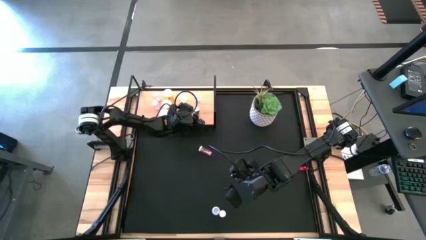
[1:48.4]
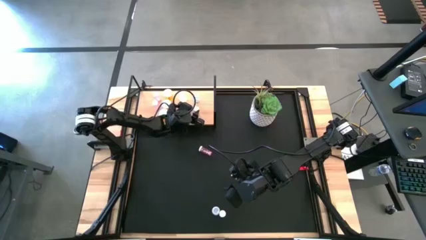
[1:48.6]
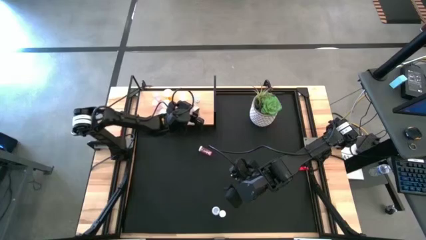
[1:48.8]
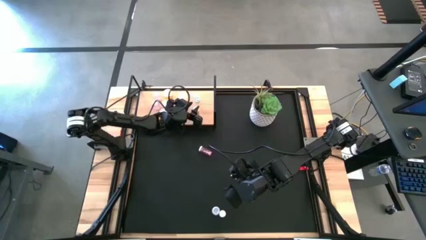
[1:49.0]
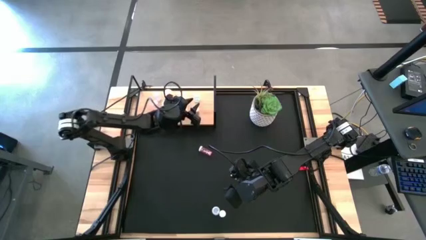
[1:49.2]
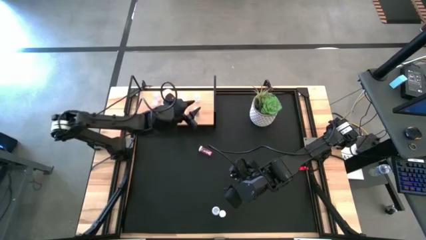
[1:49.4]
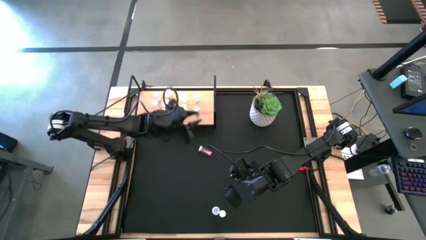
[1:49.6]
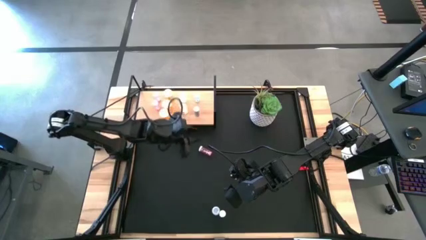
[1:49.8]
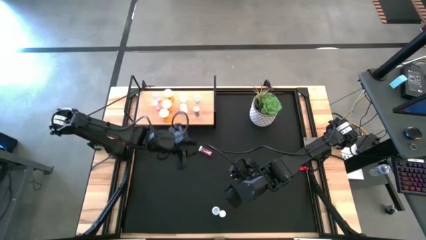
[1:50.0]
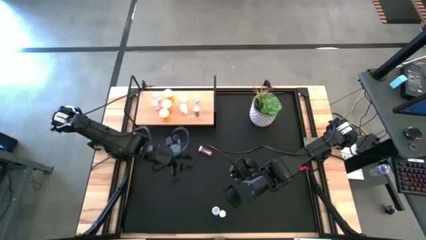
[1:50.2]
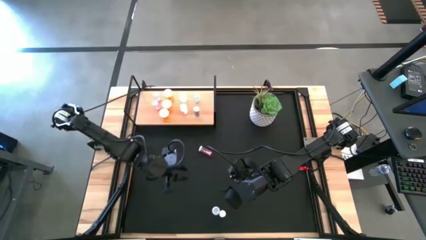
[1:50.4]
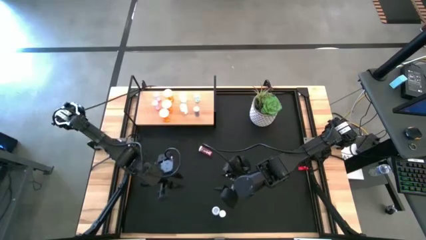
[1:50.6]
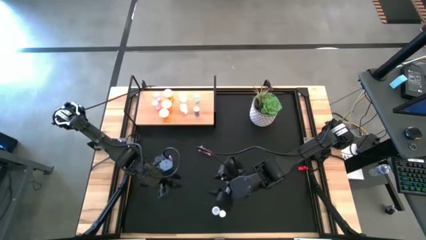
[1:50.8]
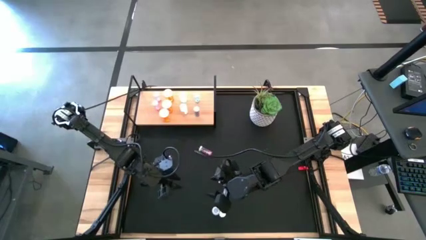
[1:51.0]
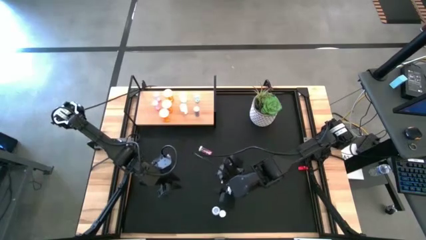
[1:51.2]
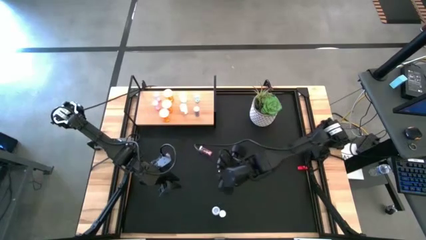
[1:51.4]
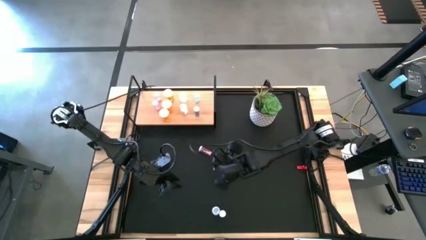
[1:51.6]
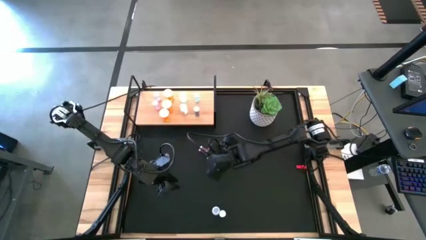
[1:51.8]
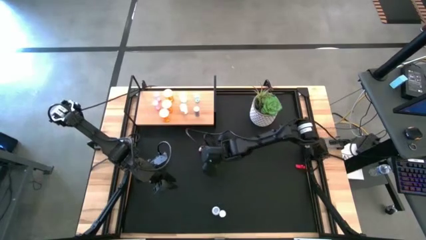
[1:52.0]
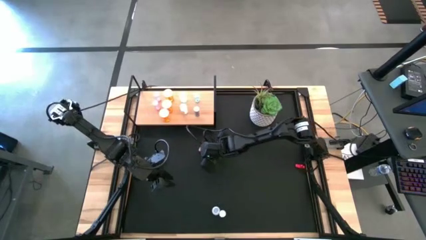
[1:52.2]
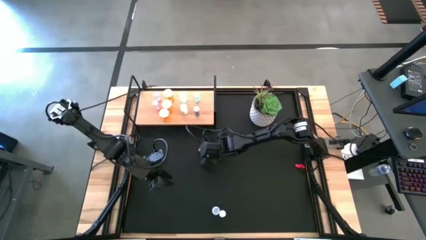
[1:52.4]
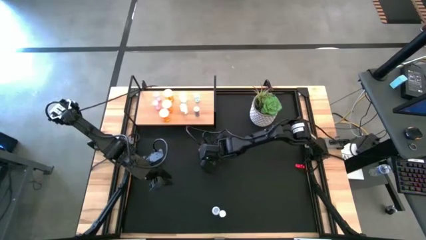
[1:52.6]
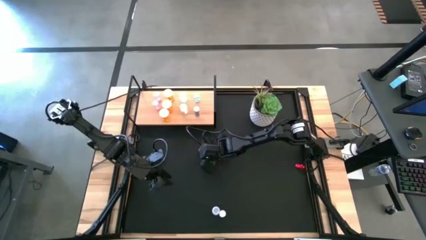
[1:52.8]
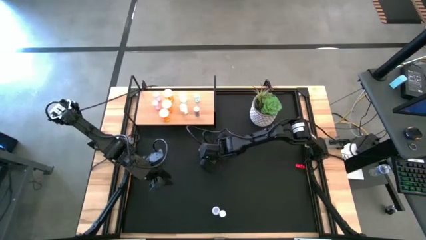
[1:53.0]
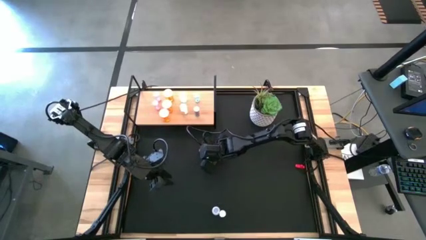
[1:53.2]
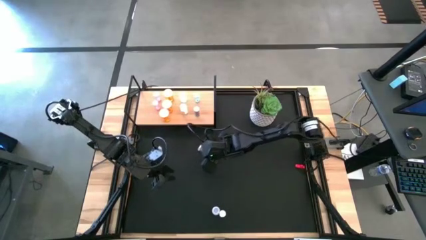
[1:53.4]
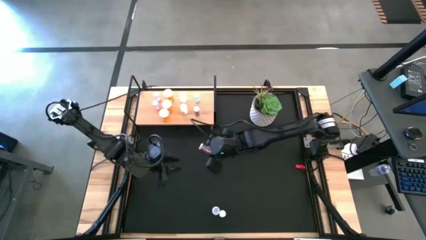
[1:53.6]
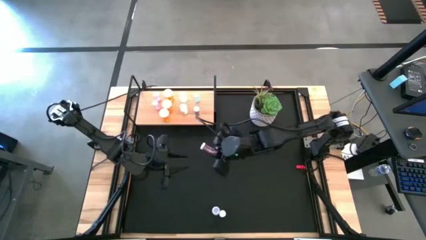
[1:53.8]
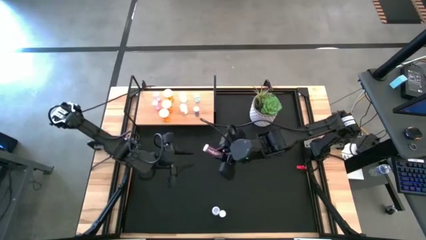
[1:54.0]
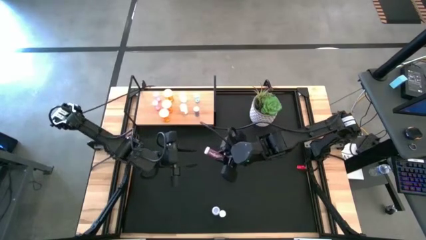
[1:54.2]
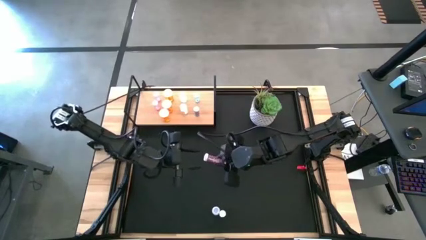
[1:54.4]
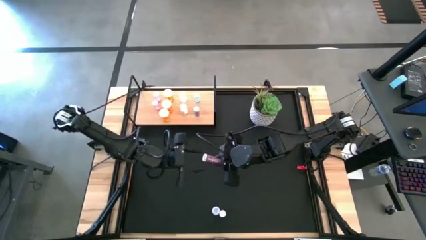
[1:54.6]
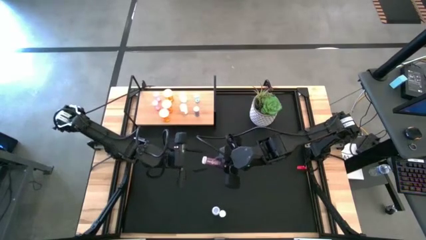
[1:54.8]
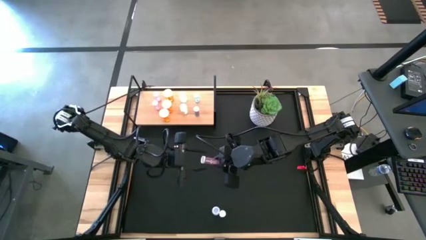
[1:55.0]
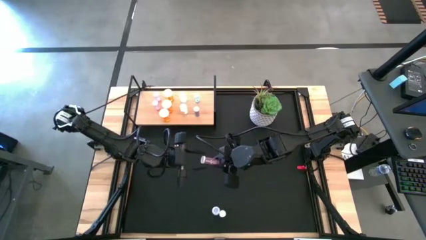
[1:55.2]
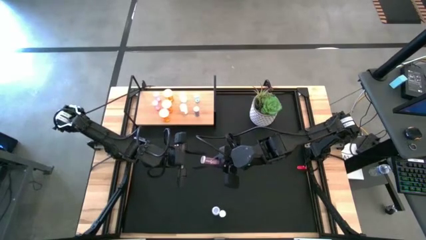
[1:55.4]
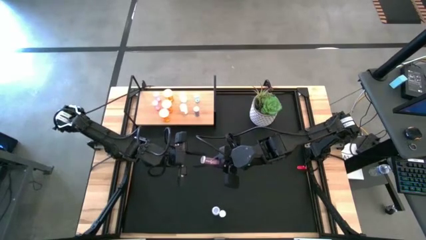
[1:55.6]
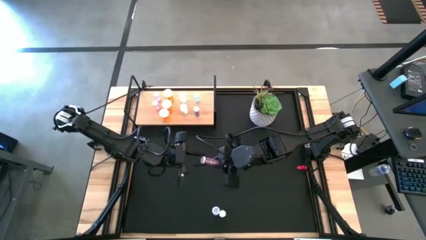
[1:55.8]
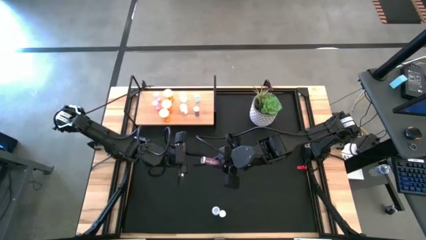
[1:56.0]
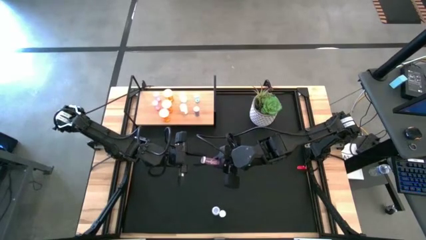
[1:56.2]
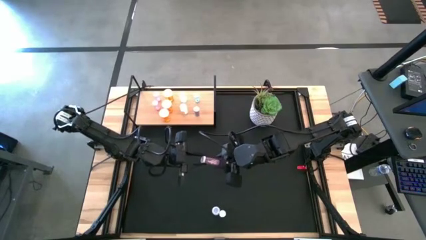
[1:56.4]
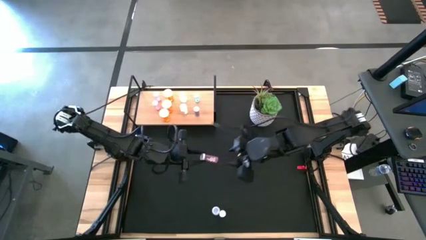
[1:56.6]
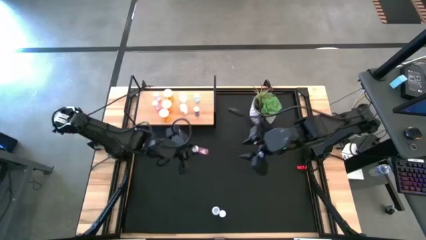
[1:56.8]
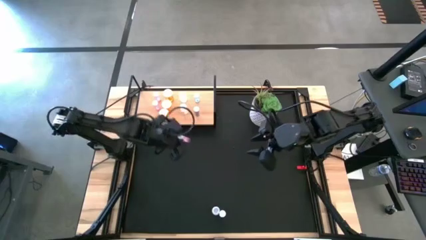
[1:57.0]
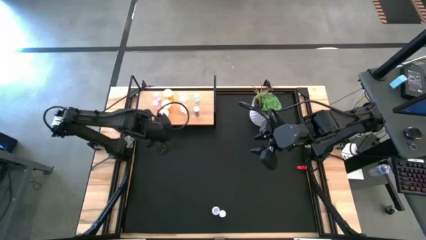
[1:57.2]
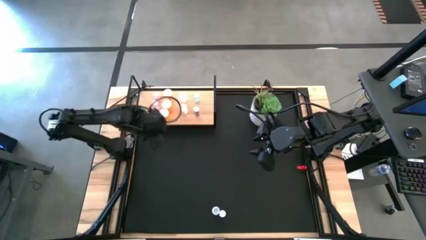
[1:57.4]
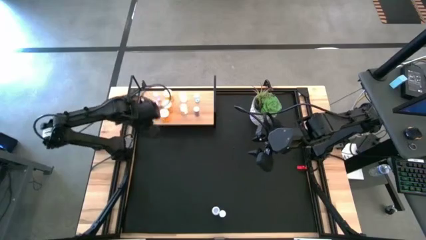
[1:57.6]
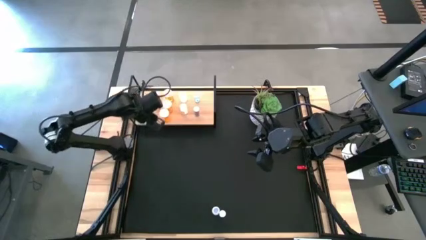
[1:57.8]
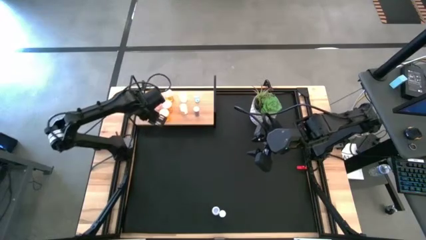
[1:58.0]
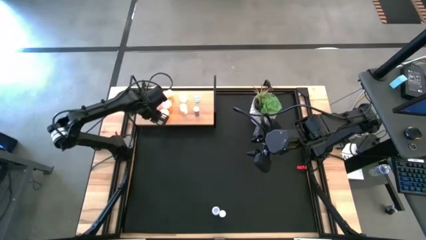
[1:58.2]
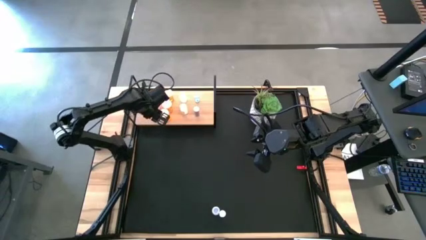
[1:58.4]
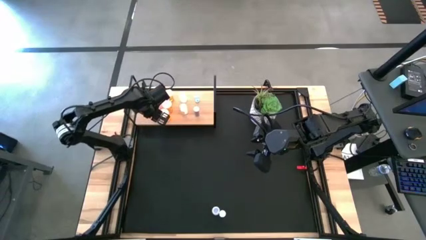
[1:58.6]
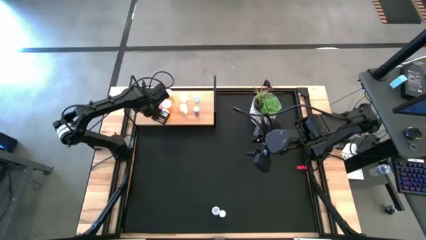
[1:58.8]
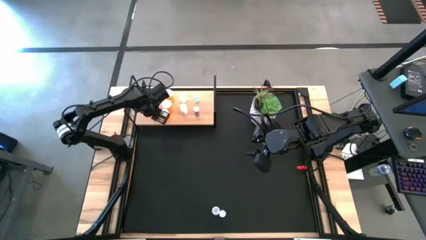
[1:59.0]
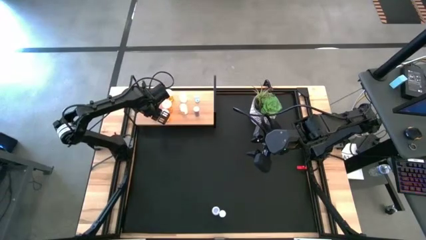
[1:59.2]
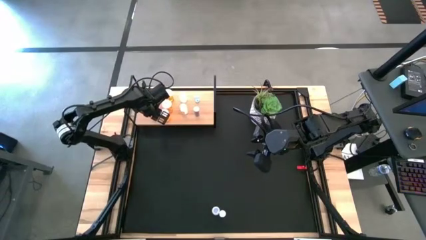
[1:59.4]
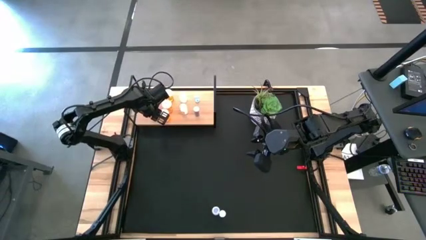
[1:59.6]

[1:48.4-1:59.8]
Task: Pick and place medicine bottles onto shelf by color
Put the pink pill bottle on the shelf aligned with the other pink pill bottle

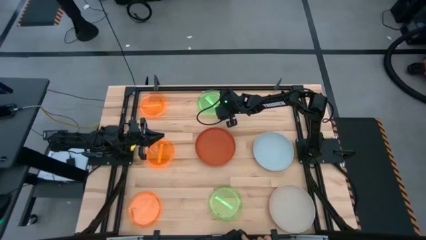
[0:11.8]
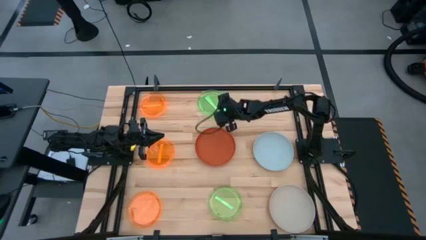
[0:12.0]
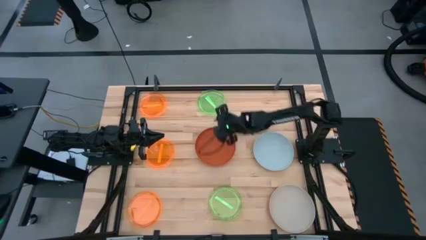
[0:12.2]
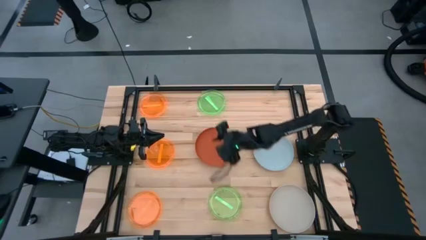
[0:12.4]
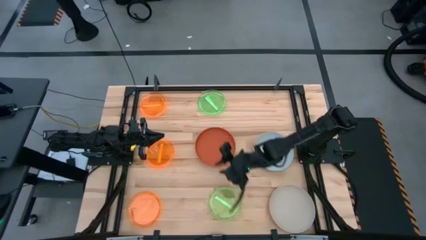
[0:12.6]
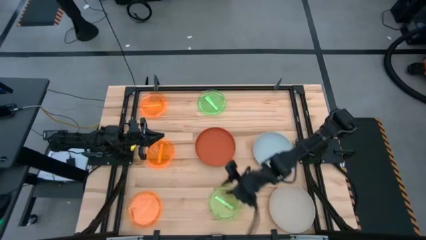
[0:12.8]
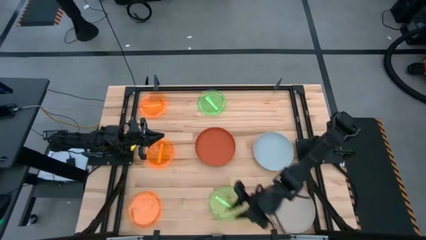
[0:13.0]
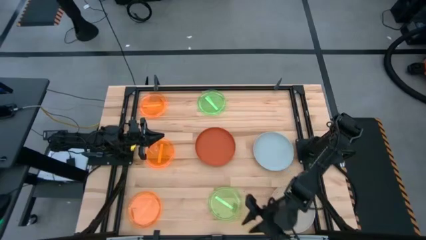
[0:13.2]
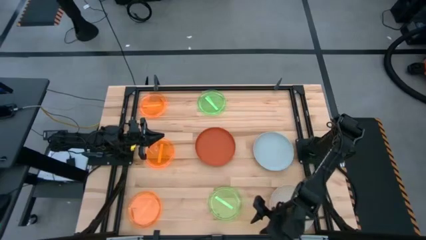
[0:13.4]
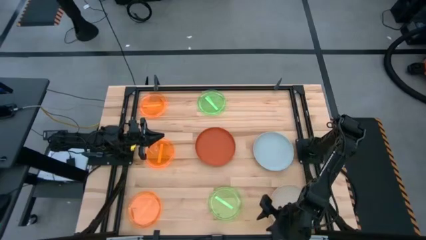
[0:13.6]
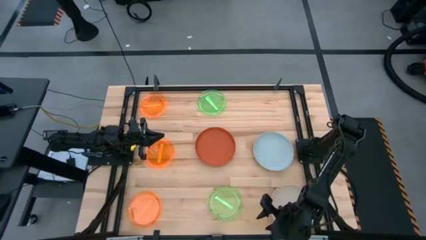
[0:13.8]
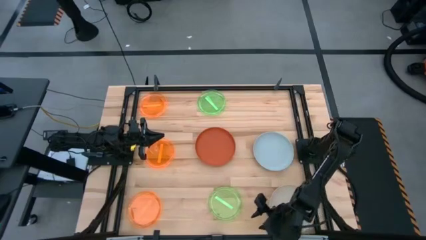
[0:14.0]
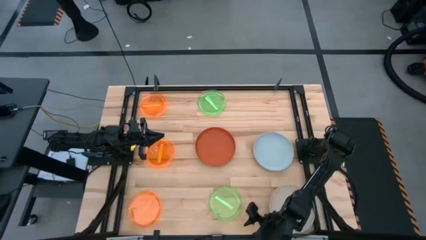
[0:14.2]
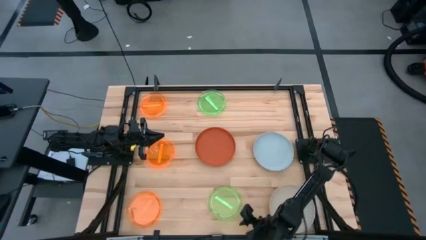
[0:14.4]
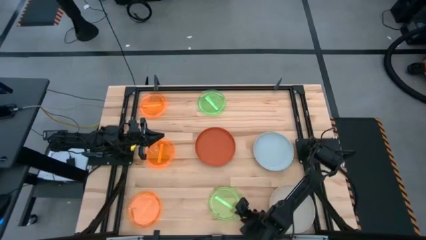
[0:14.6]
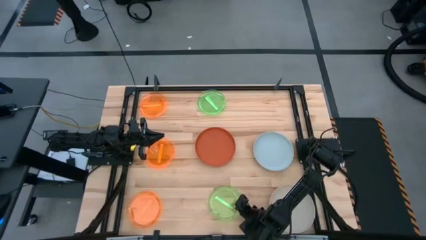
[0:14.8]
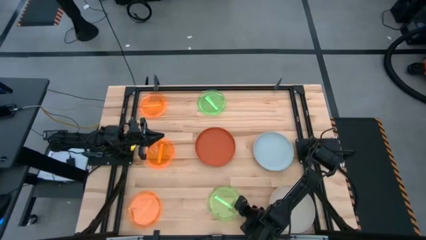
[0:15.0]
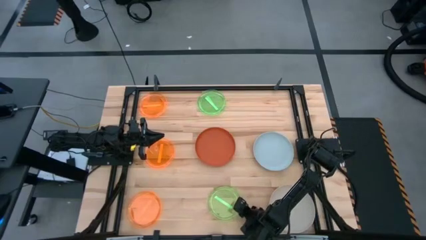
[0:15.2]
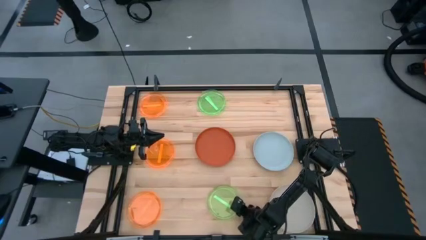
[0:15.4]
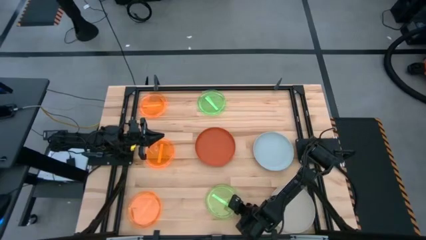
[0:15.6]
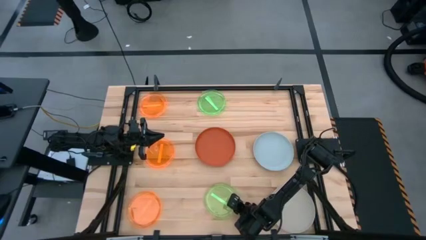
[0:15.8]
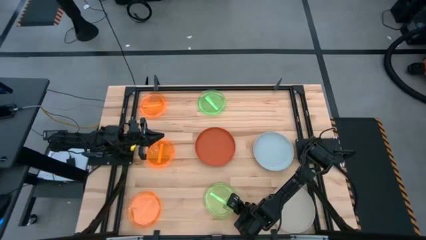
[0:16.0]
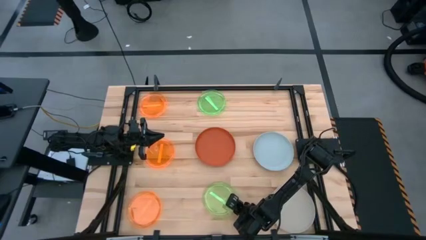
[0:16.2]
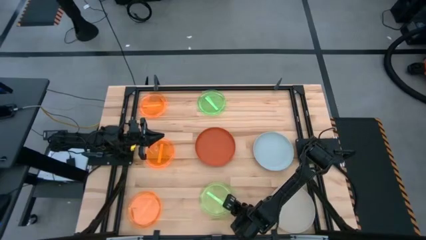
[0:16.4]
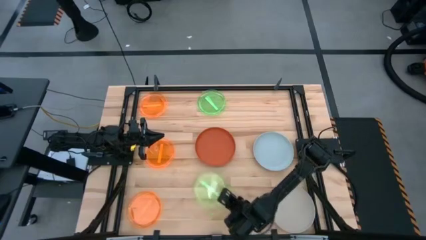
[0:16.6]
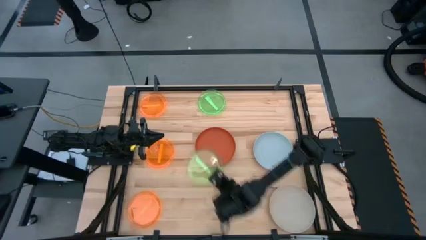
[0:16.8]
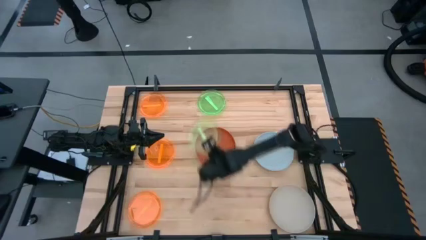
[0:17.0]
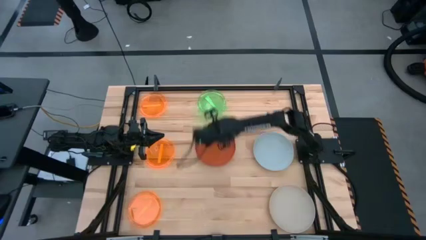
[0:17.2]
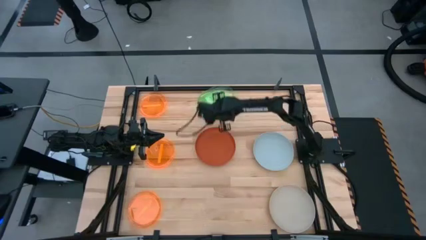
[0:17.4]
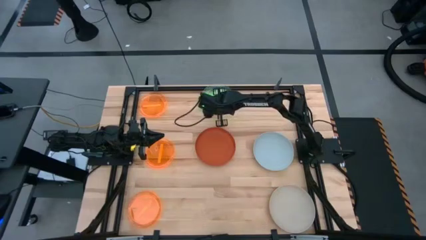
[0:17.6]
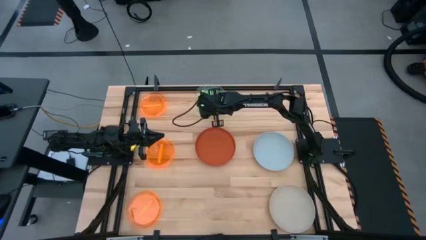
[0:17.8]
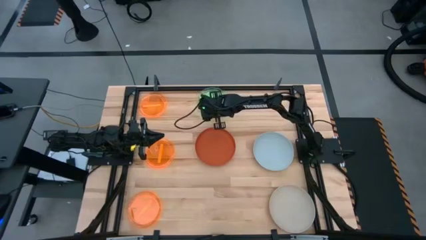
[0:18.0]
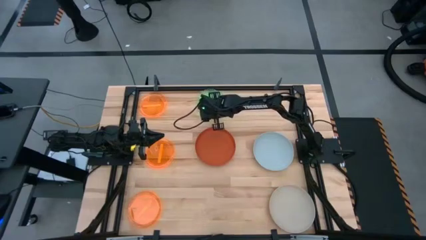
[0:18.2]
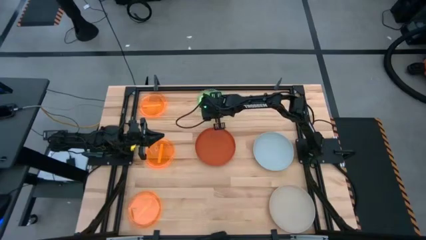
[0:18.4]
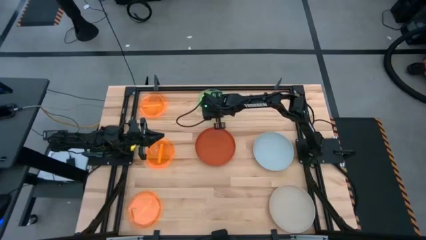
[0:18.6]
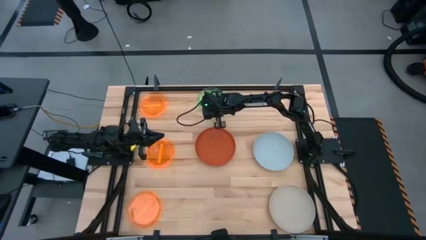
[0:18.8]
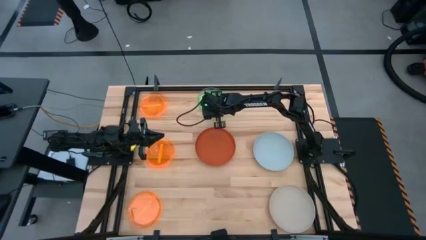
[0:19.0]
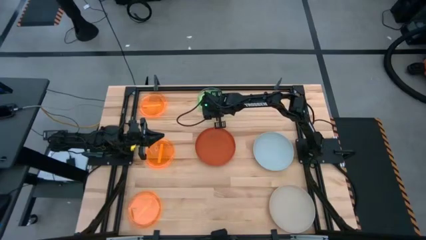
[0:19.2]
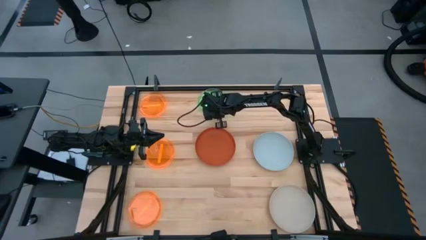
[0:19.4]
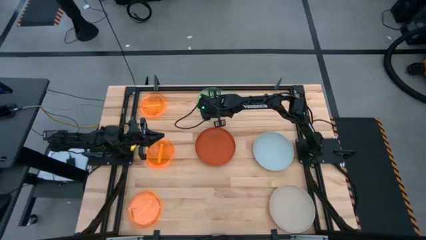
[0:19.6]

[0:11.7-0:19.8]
Task: Stack plastic plates
Stack the bottom green plate on top of the other green plates
